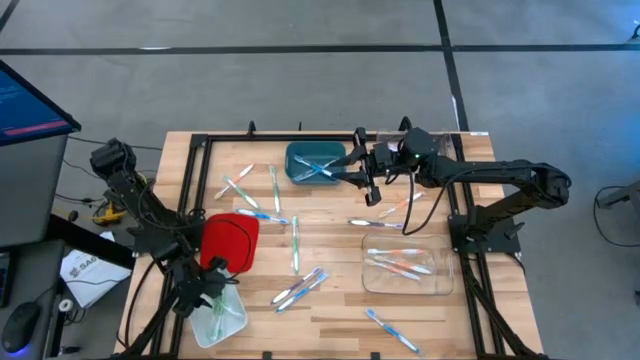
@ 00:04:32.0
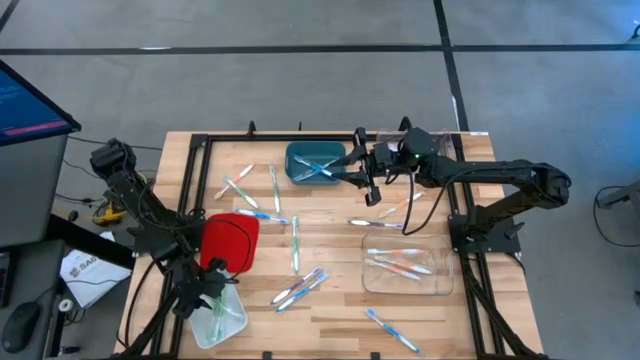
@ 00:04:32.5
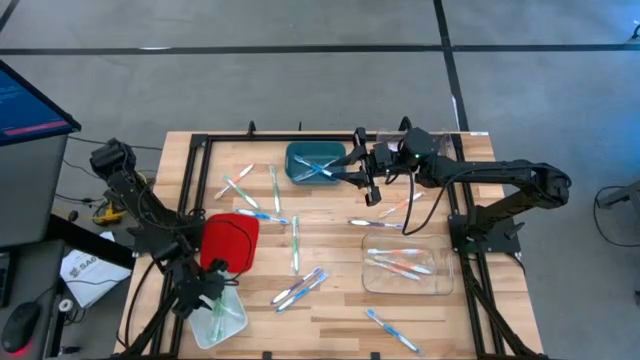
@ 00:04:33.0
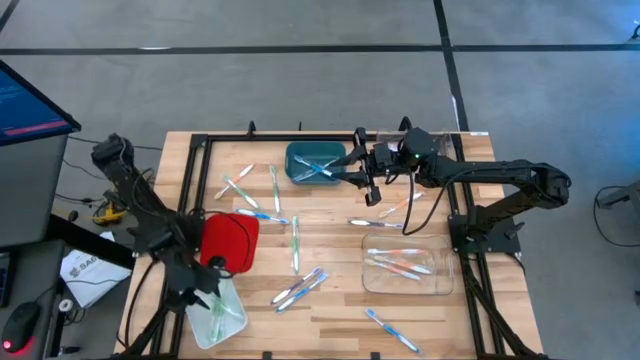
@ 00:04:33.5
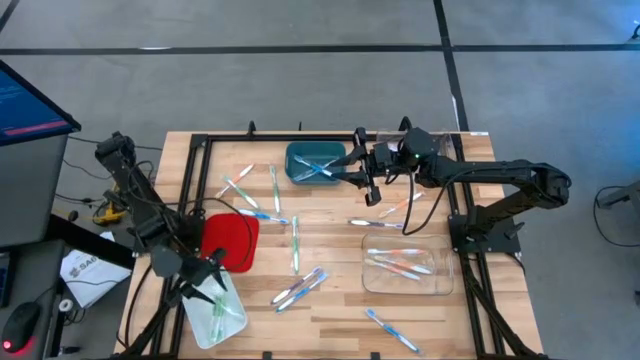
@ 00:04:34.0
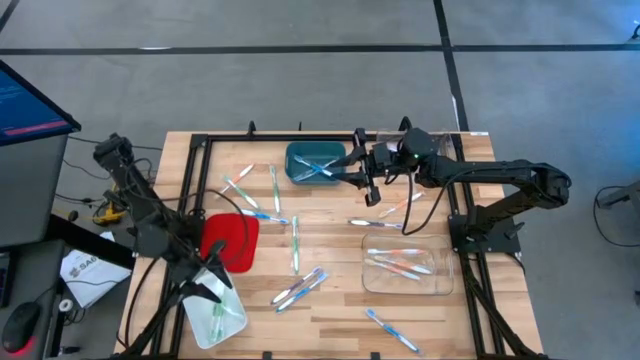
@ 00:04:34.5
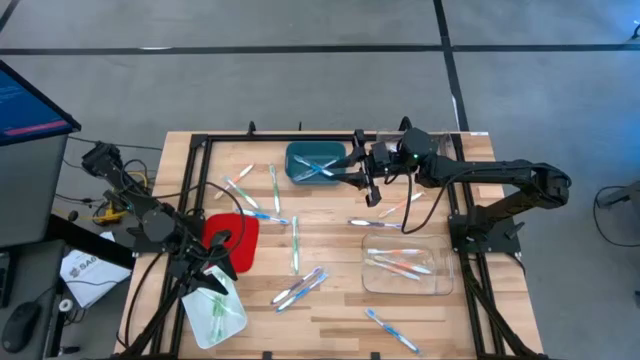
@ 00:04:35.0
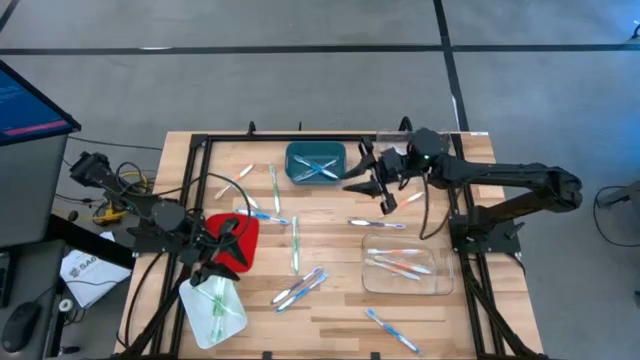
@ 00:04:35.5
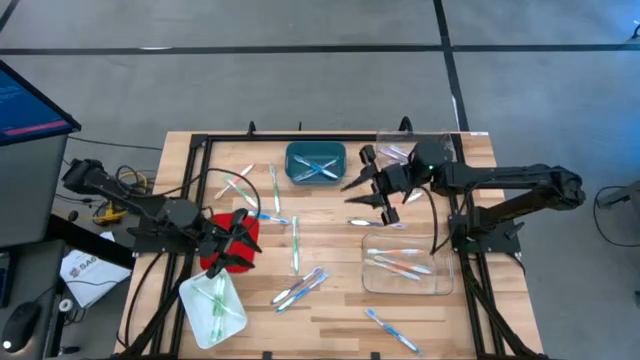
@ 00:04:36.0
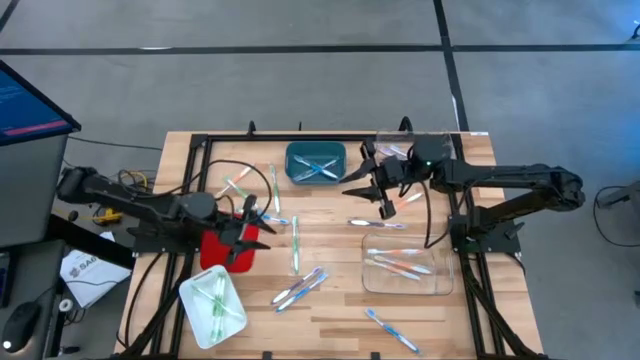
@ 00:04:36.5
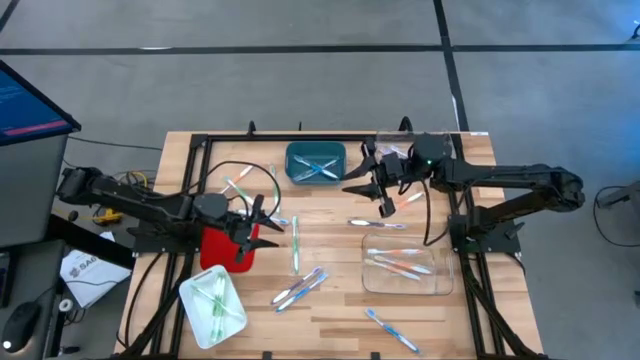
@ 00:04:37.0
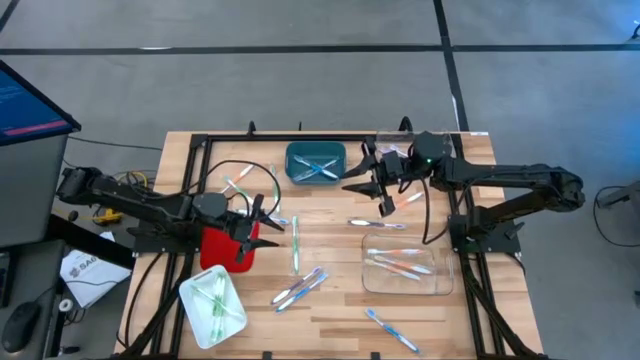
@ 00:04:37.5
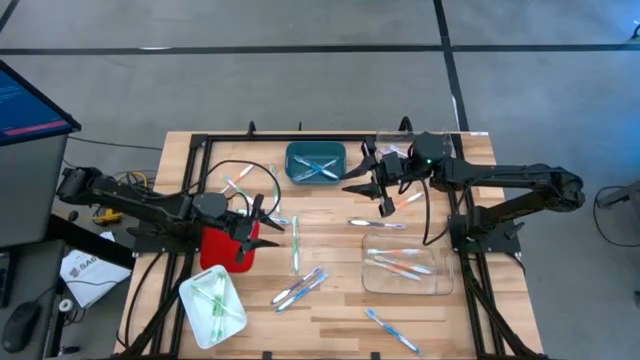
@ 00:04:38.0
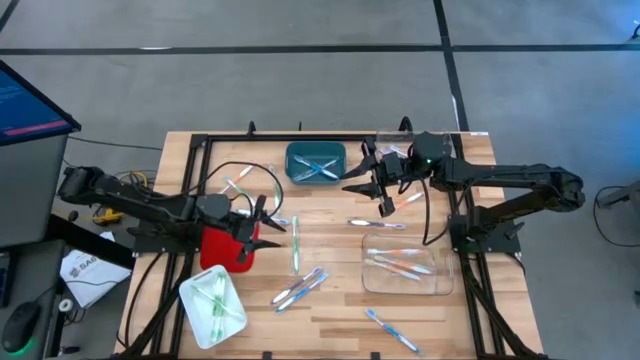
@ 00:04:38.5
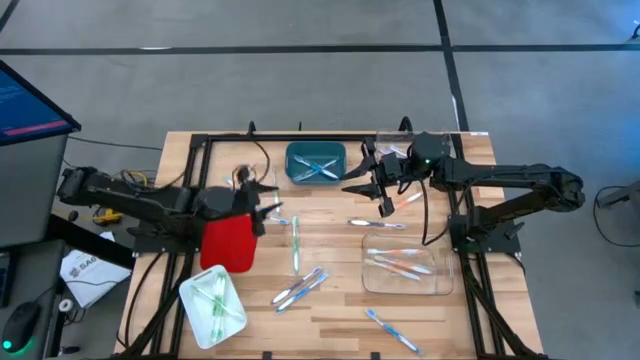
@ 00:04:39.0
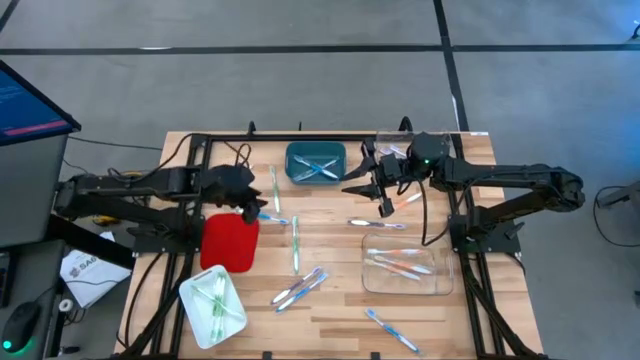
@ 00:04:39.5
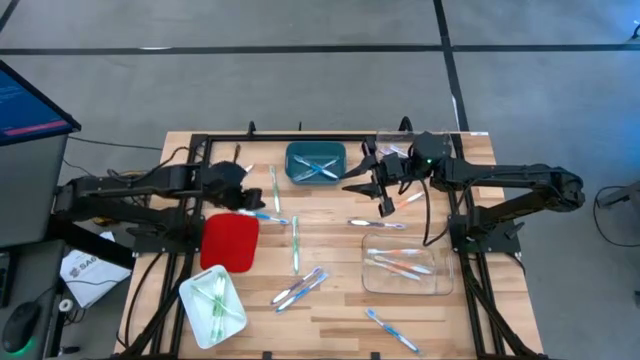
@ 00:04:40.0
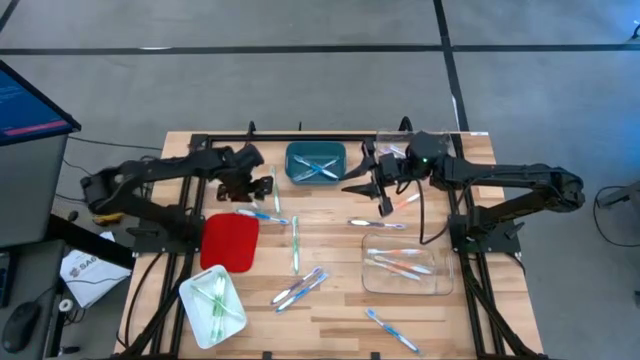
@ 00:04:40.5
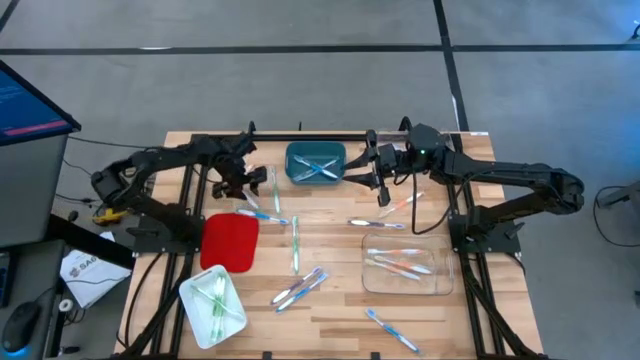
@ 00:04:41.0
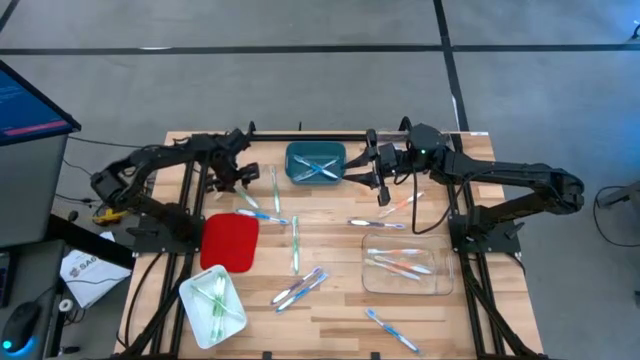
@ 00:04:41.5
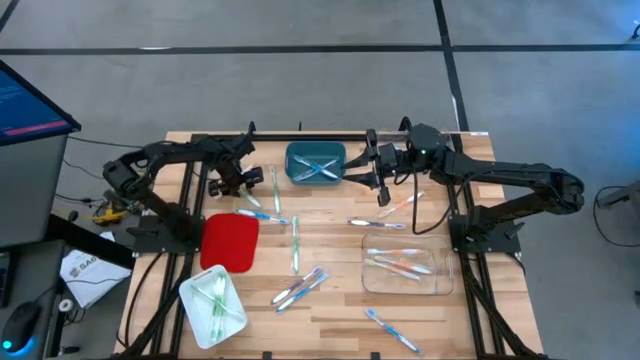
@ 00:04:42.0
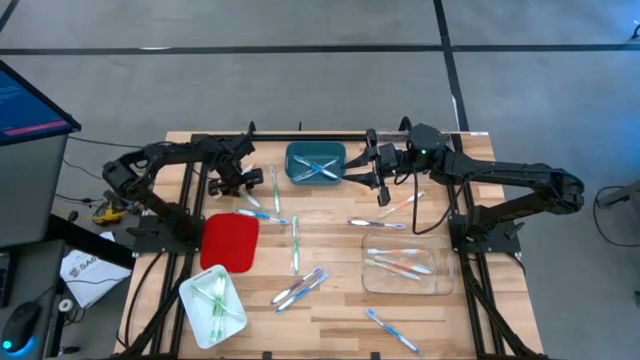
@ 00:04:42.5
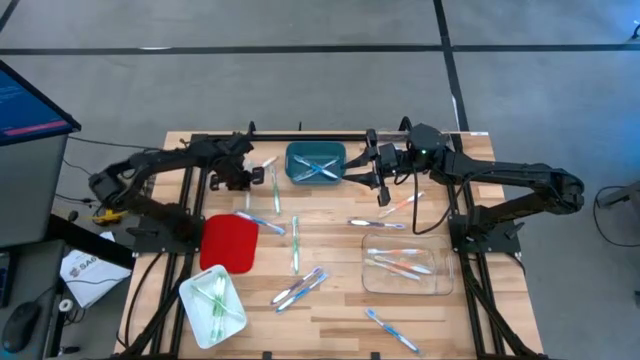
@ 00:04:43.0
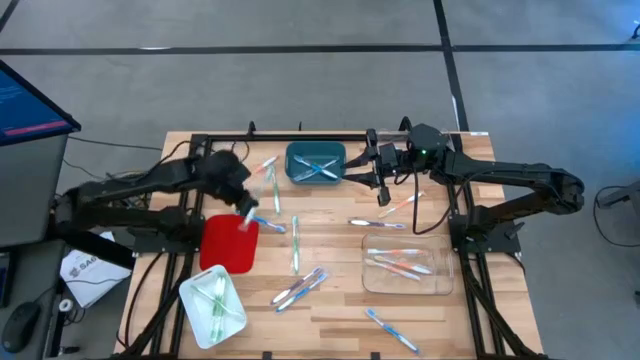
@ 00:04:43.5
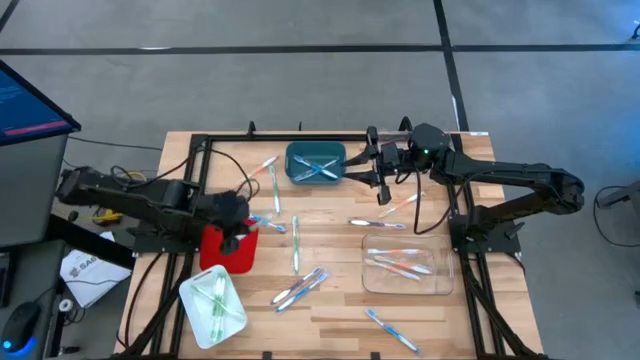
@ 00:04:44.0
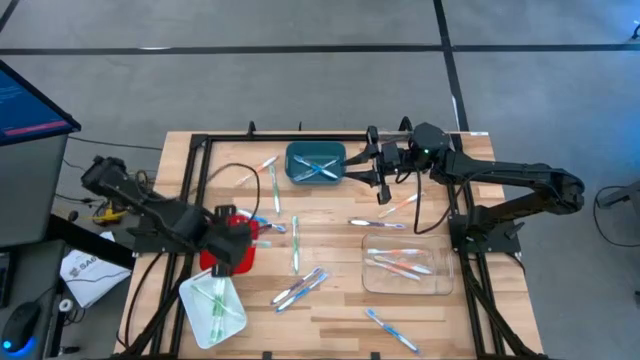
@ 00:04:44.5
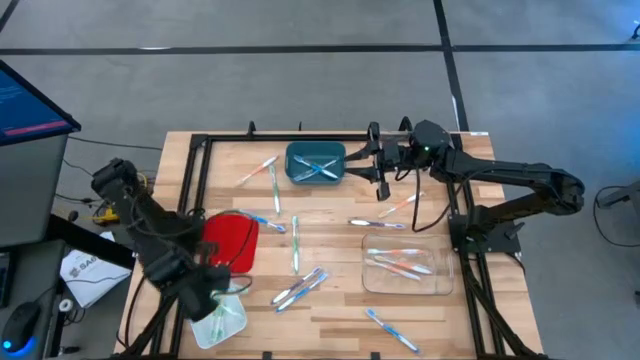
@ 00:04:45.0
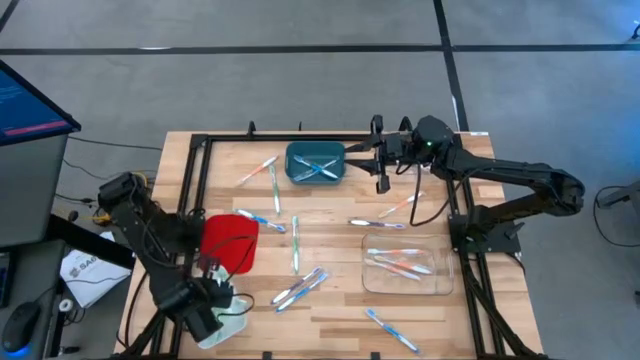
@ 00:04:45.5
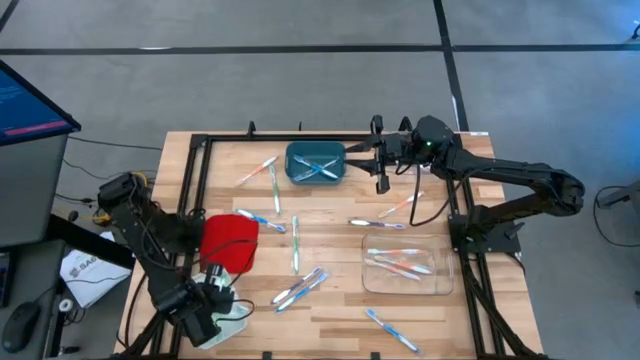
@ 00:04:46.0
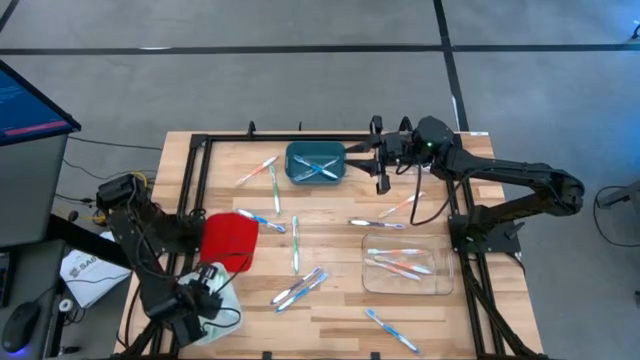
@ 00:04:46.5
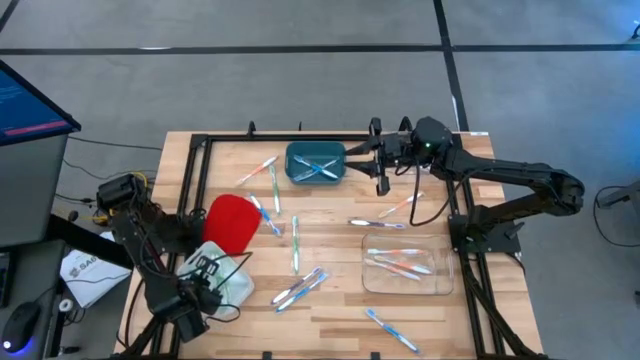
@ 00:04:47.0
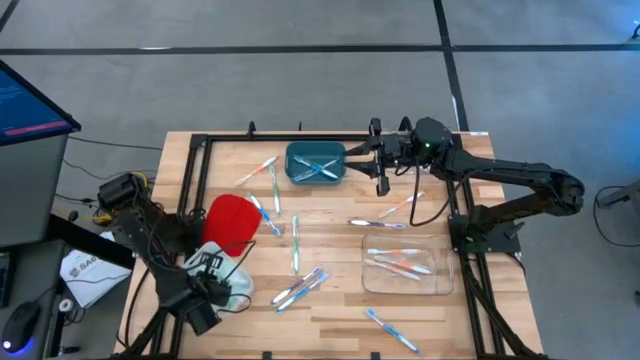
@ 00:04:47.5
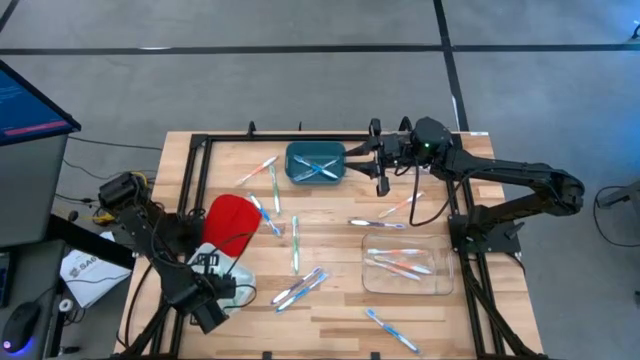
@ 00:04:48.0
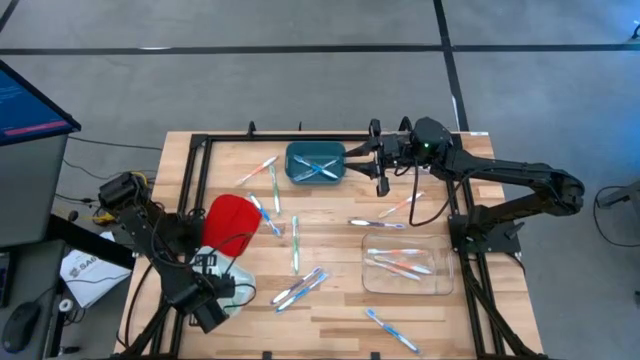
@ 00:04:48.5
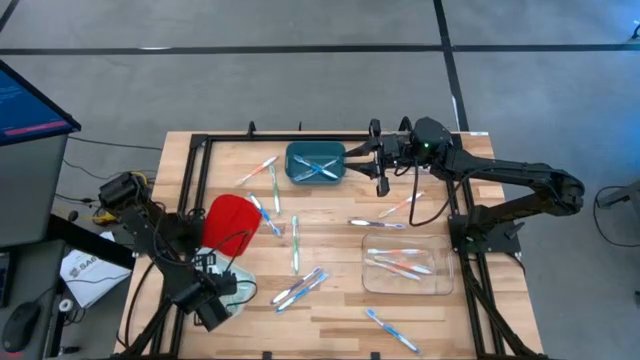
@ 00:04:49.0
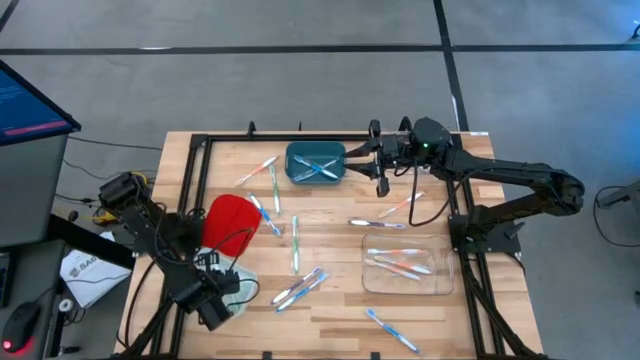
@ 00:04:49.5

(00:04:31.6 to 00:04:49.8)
Task: Pick & Place Toothbrushes
Put the green toothbrush into the white bin

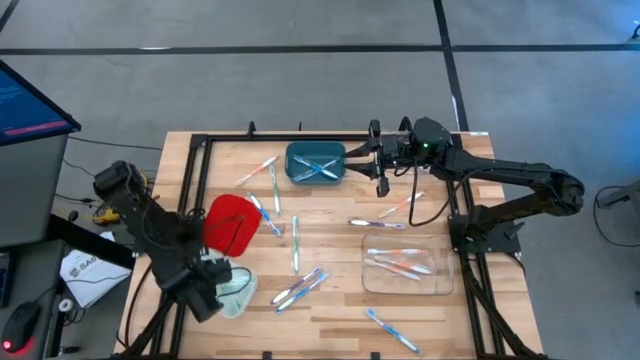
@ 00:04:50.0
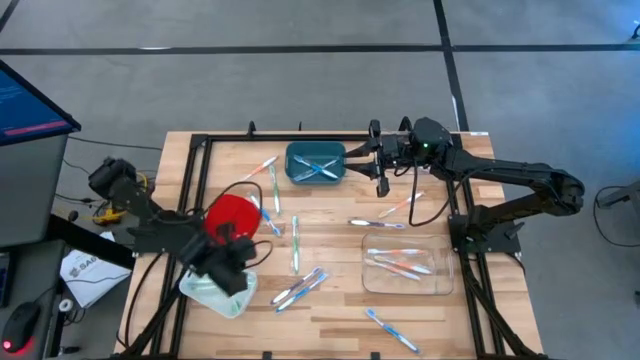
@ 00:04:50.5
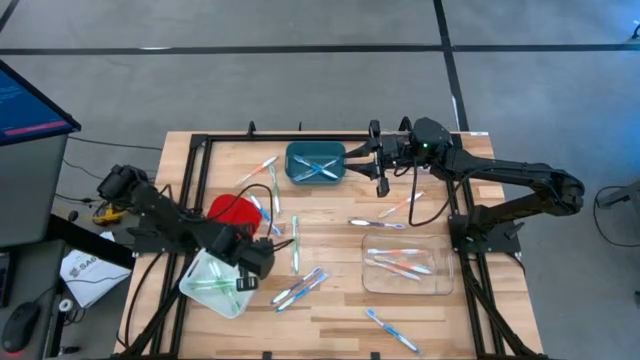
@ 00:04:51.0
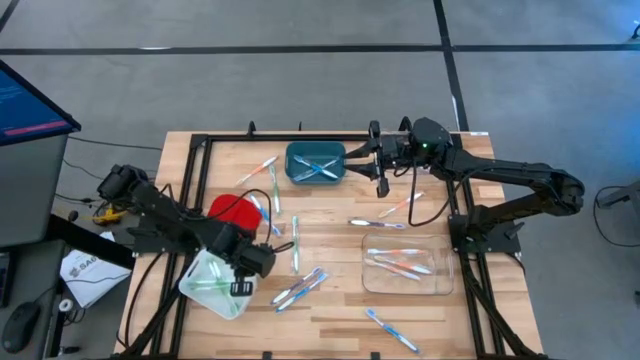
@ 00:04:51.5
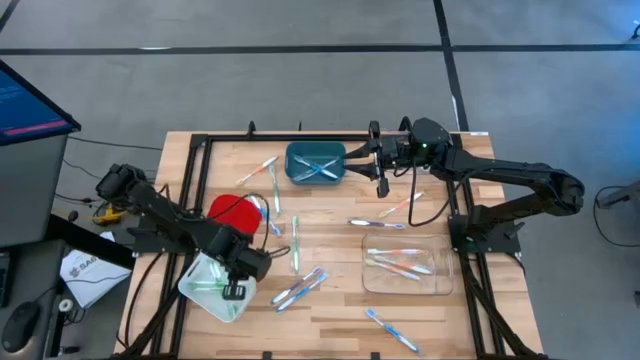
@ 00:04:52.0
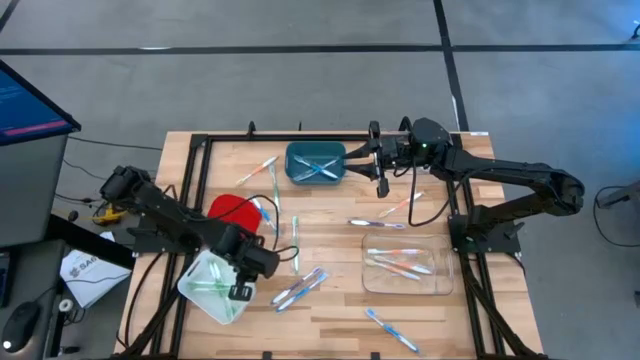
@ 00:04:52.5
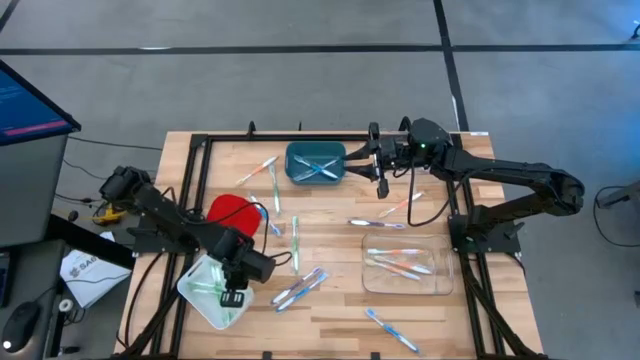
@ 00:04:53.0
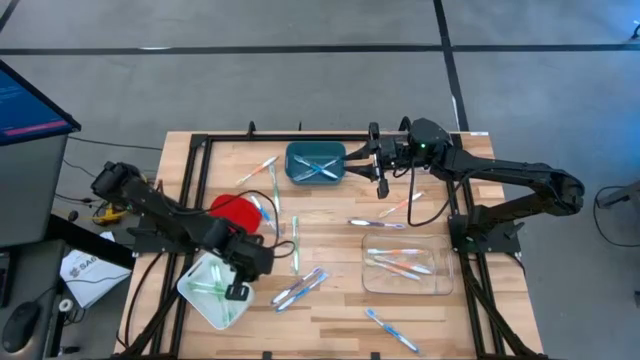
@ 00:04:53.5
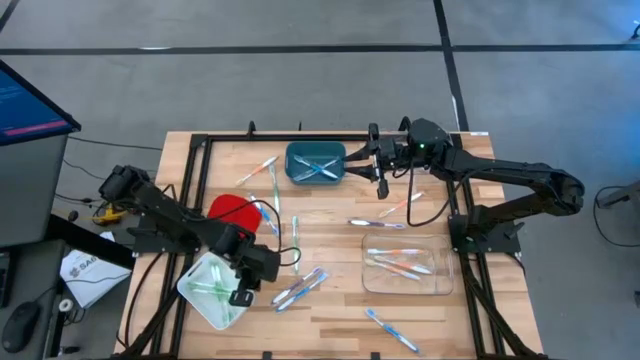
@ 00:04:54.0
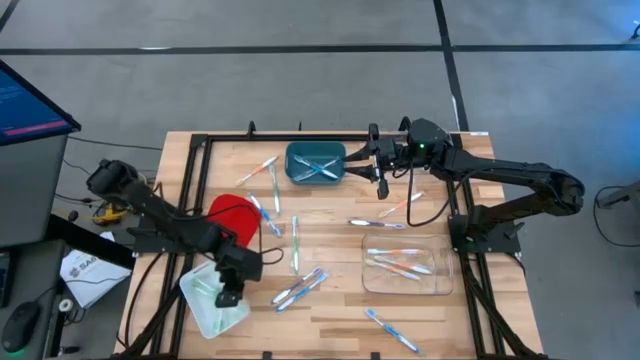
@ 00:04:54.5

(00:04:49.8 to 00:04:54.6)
Adjust the white bin on the table
